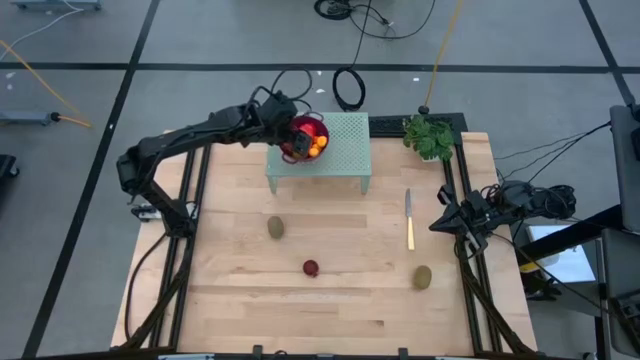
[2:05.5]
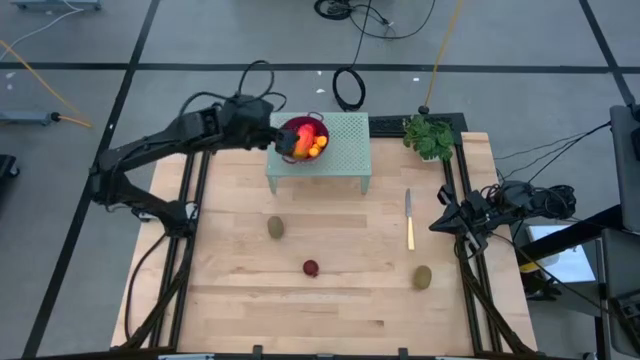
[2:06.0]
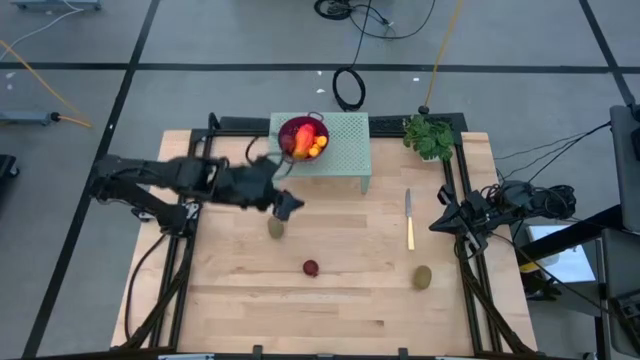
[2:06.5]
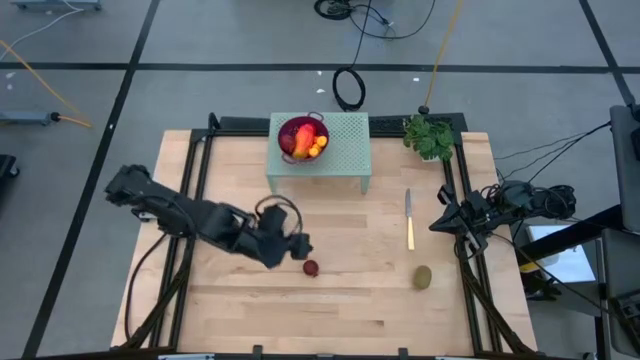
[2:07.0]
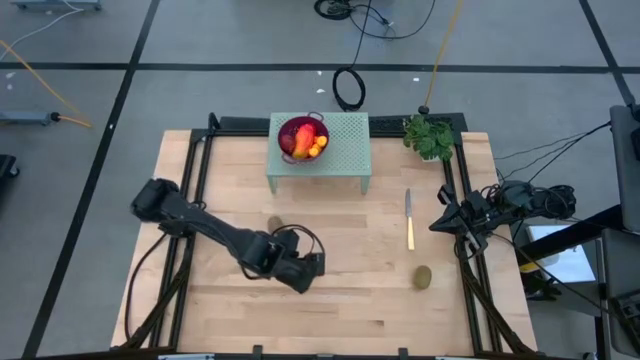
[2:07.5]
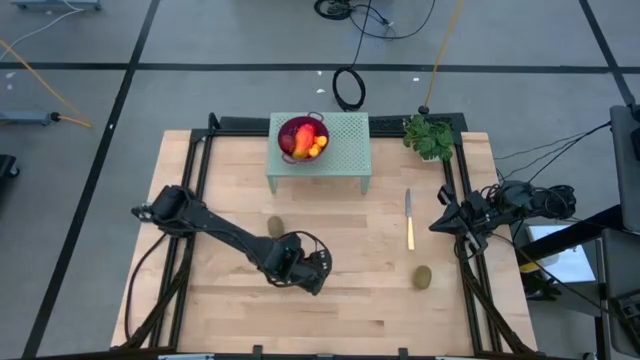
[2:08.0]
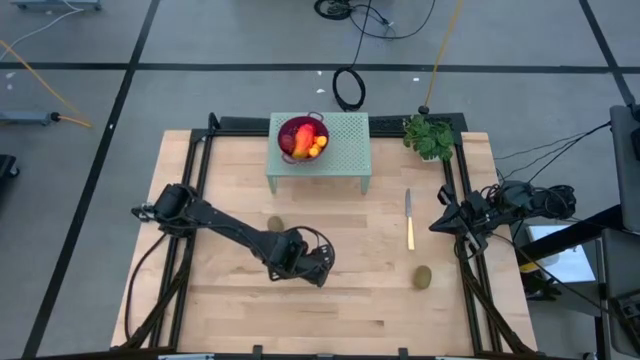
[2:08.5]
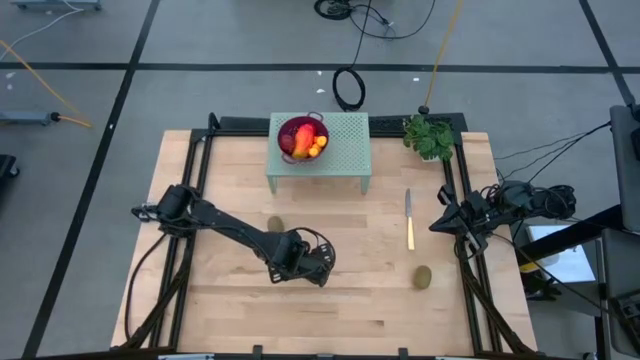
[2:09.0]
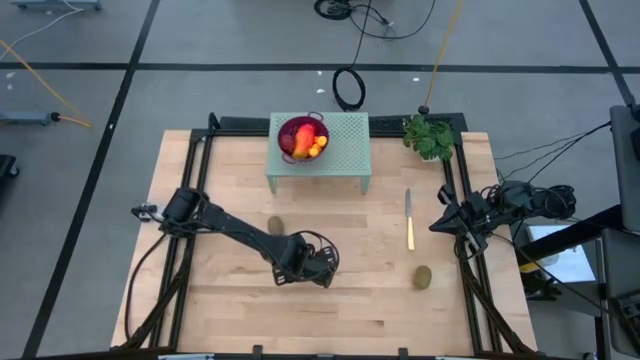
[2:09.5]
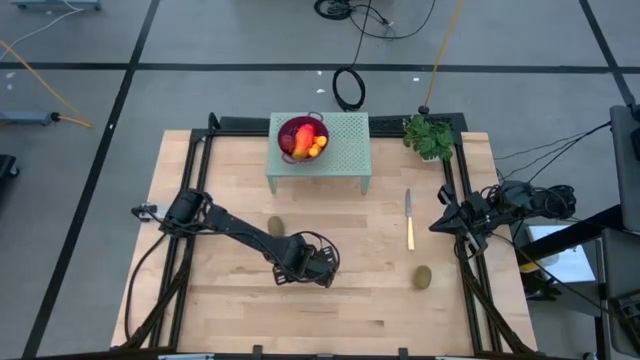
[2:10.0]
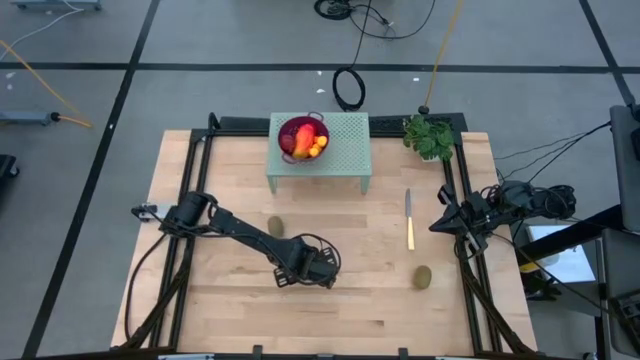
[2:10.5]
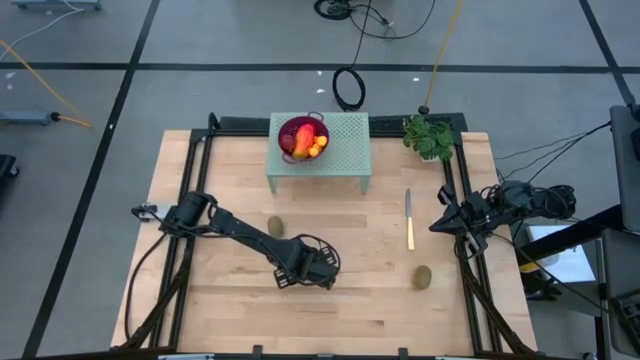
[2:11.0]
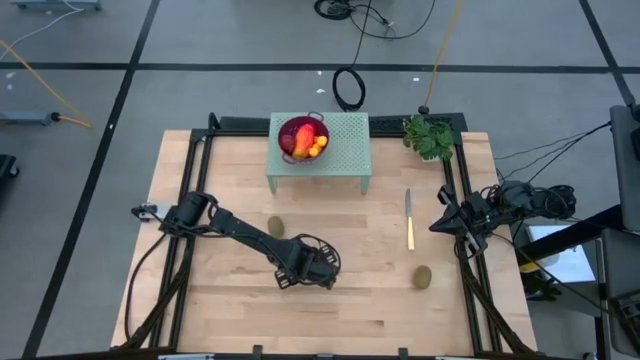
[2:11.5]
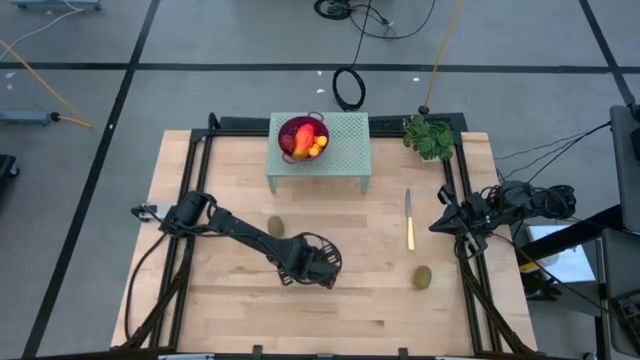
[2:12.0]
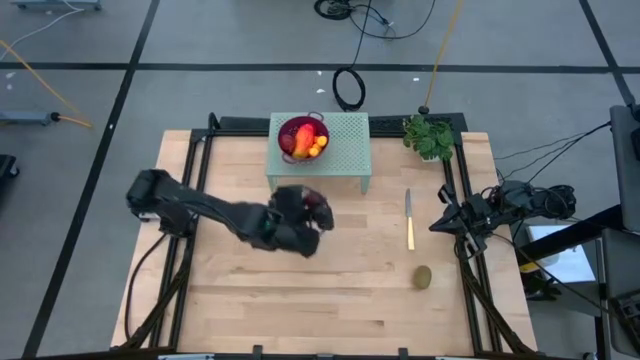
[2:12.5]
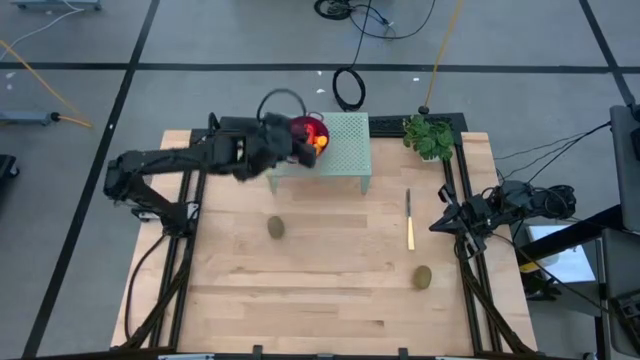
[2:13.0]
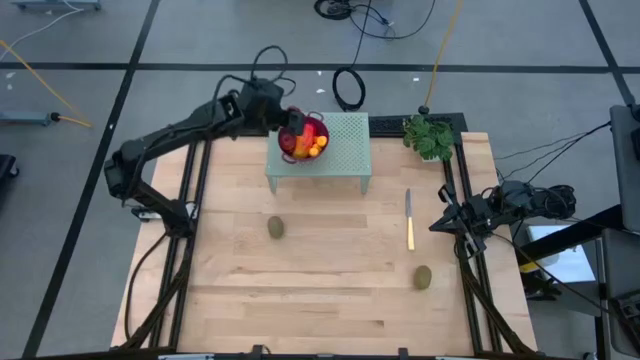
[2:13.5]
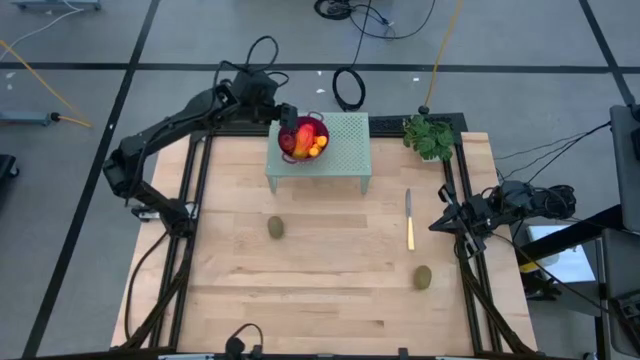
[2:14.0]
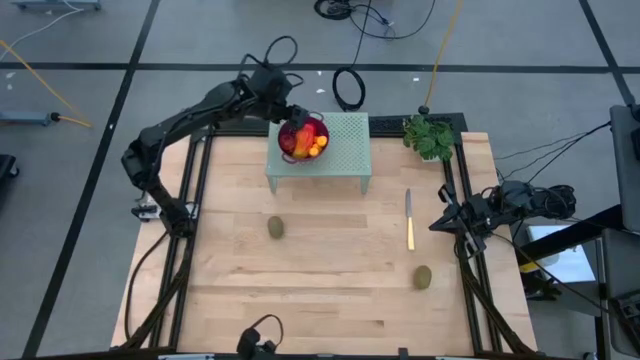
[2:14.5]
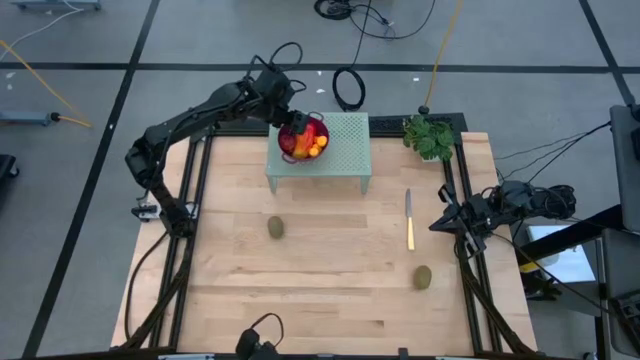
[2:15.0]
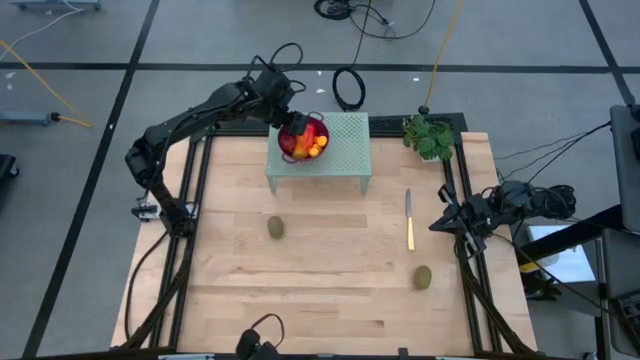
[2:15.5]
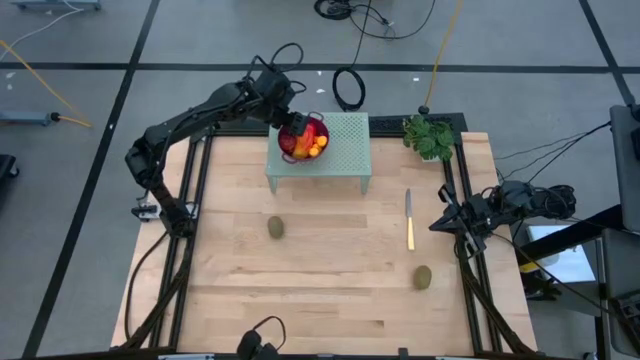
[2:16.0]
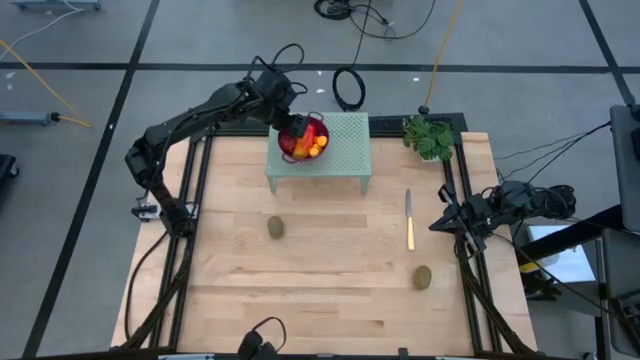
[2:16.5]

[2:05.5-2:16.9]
Task: Pick & Place Fruit
Put the pomegranate into the violet strainer bowl on the shelf

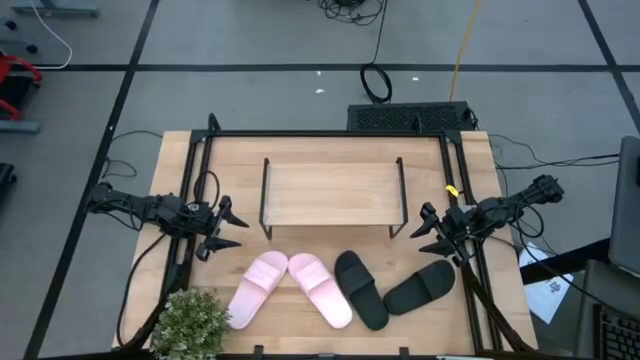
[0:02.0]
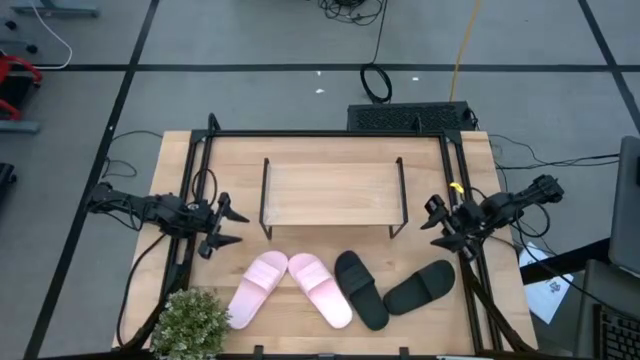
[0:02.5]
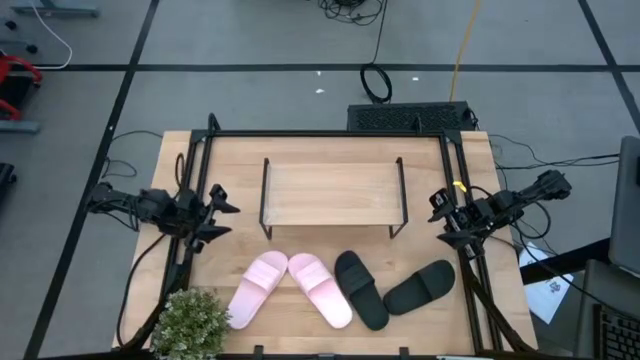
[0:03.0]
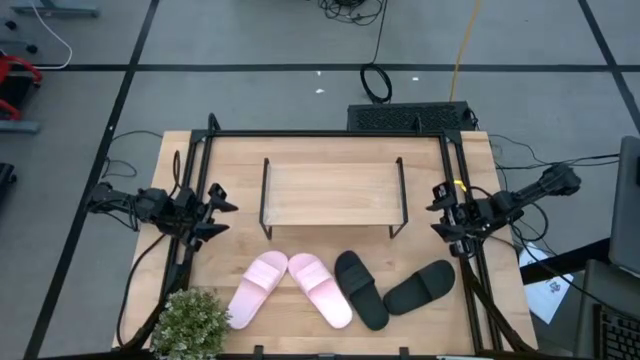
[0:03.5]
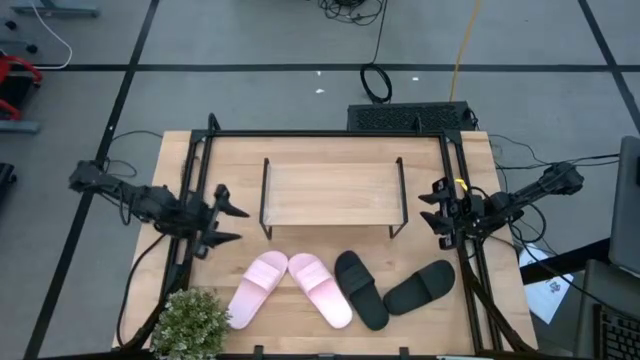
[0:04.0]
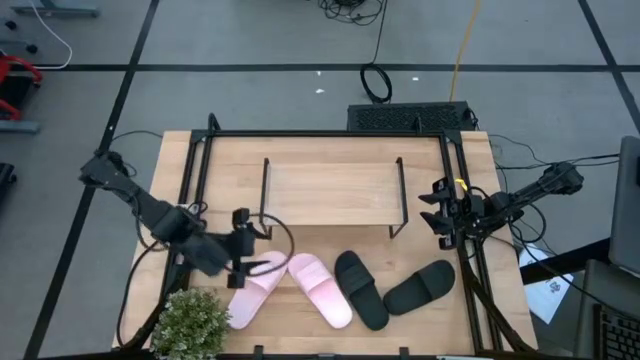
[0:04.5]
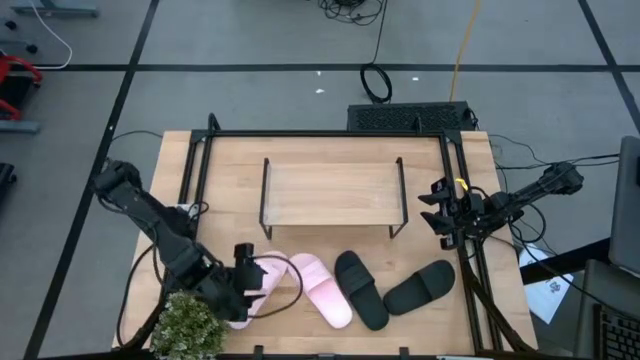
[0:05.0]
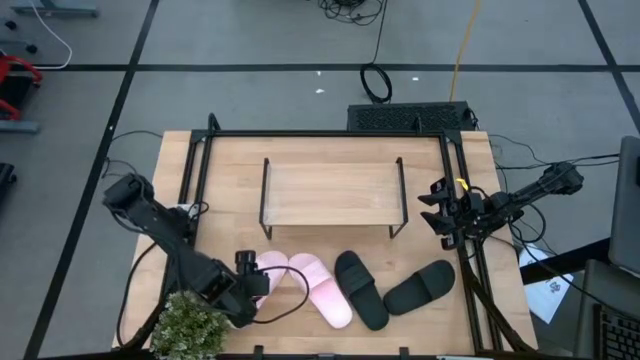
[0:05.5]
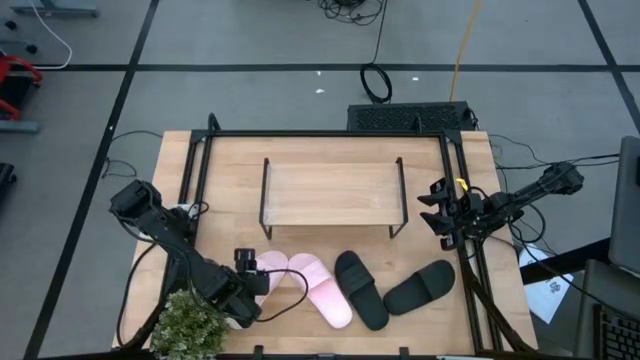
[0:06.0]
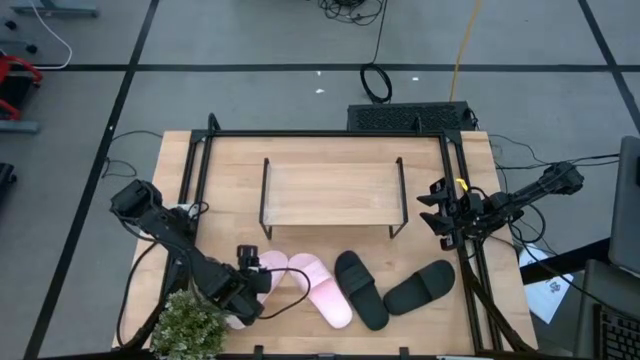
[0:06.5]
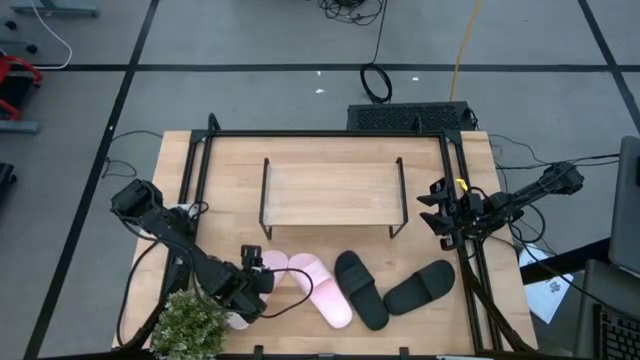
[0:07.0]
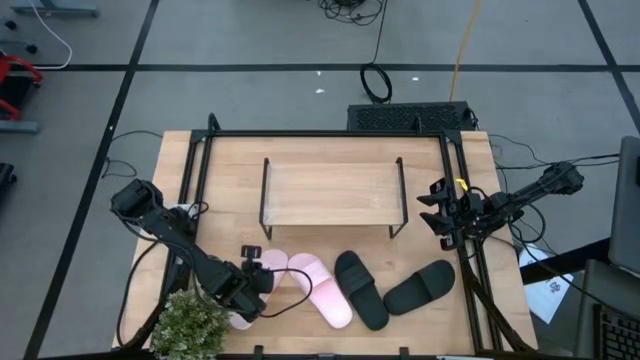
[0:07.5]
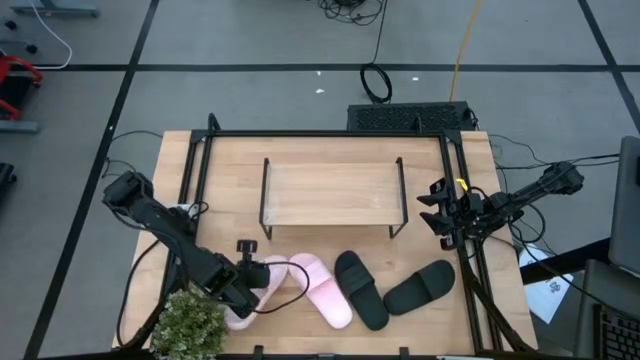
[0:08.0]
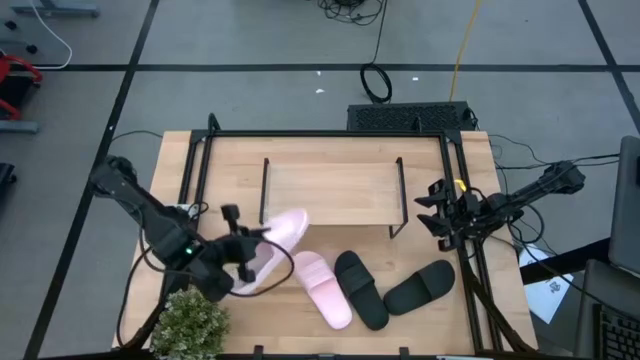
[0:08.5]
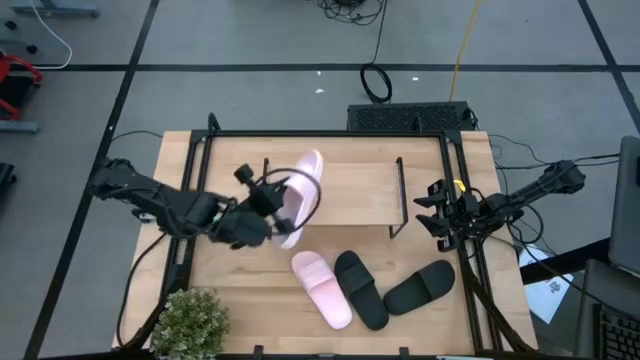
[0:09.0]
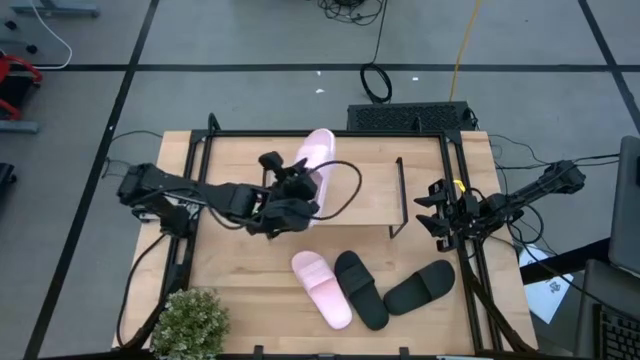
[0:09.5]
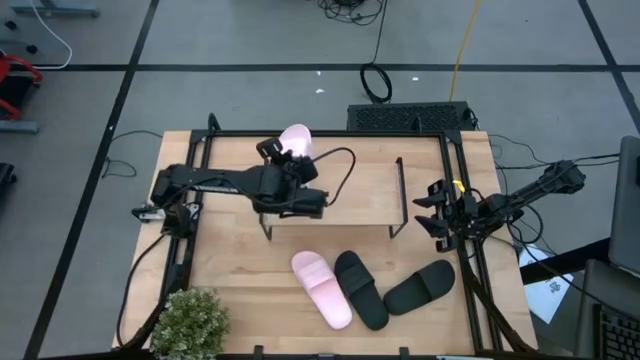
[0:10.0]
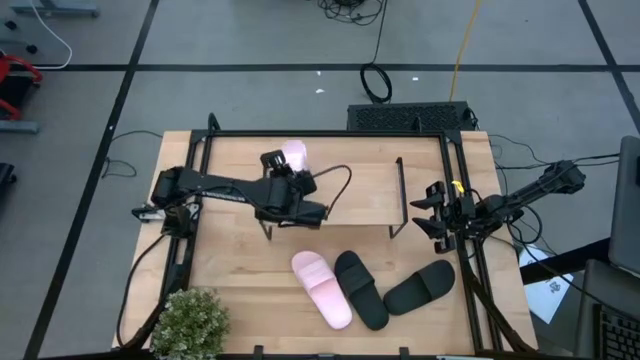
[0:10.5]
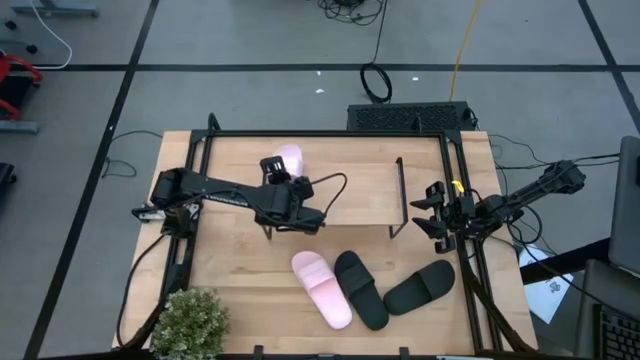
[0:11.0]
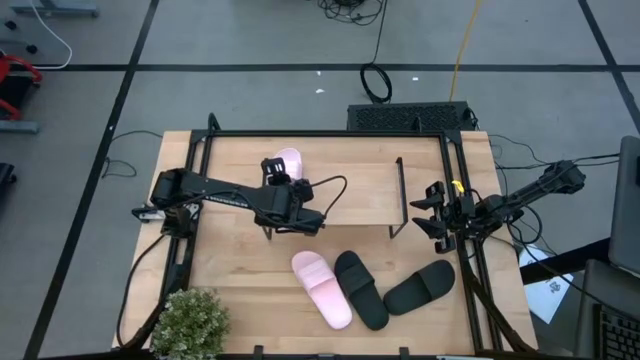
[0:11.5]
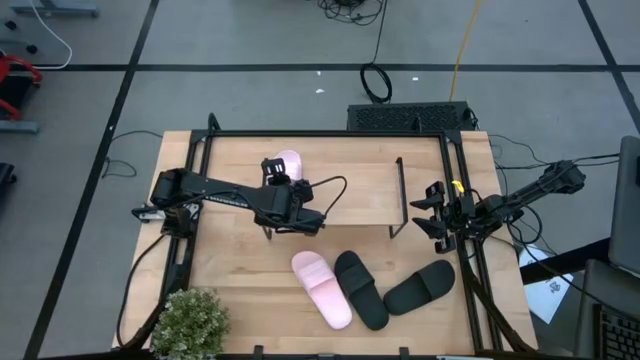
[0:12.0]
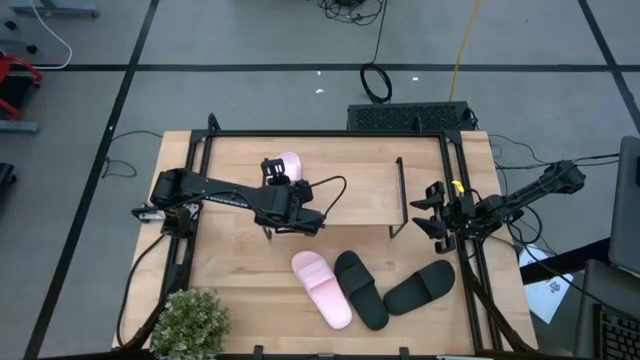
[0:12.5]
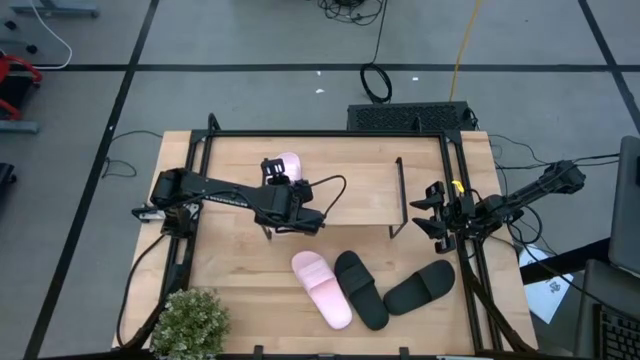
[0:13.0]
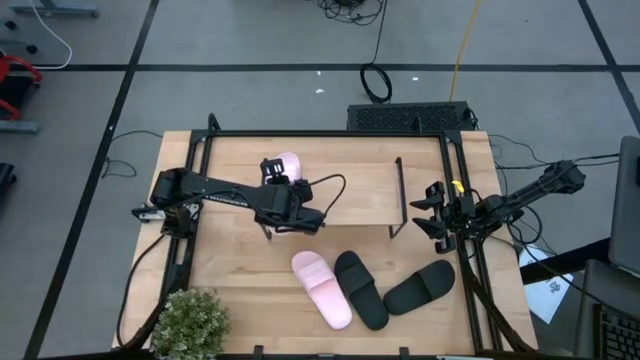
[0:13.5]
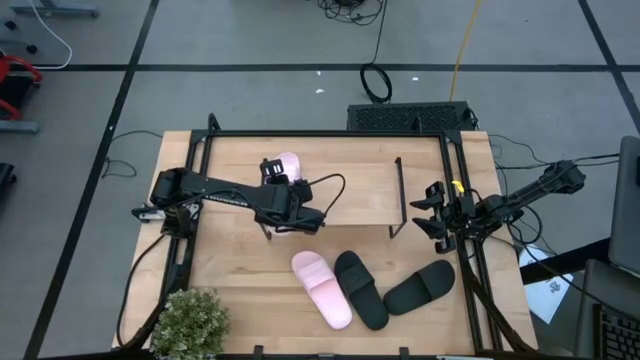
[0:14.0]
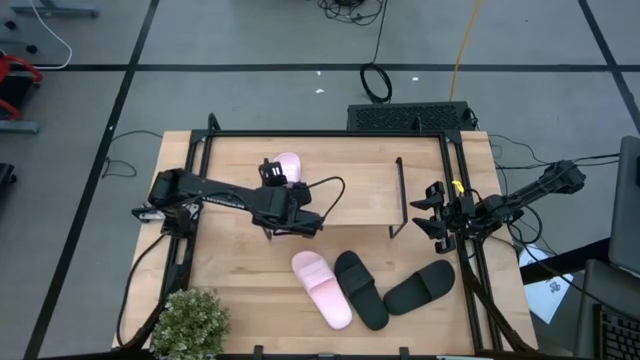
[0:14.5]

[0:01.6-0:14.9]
Task: Pick and place slides into the shelf
Put the left pink slipper on the shelf
